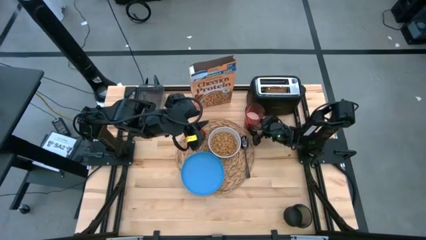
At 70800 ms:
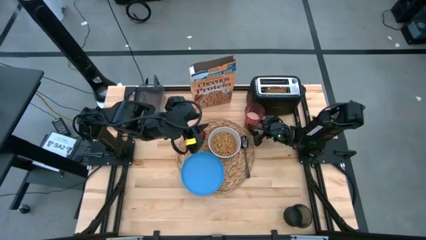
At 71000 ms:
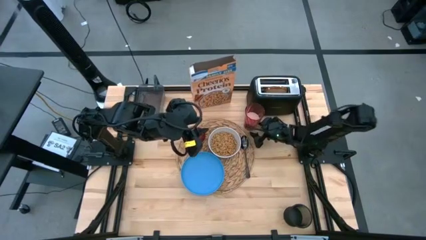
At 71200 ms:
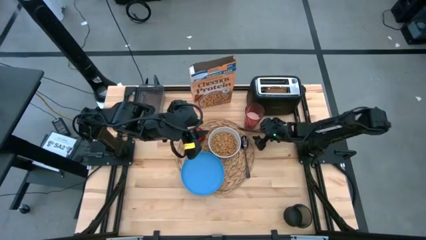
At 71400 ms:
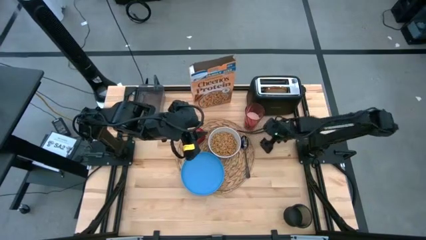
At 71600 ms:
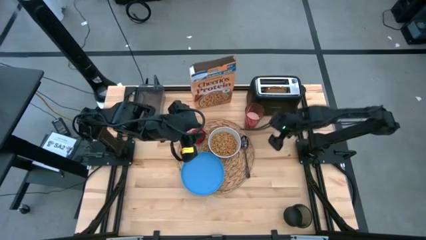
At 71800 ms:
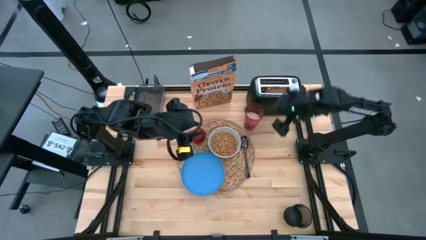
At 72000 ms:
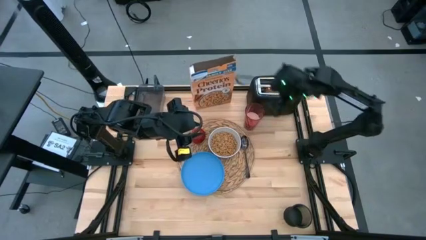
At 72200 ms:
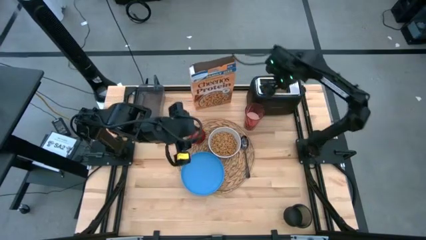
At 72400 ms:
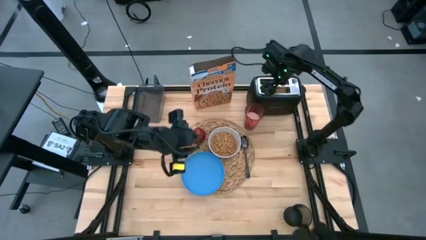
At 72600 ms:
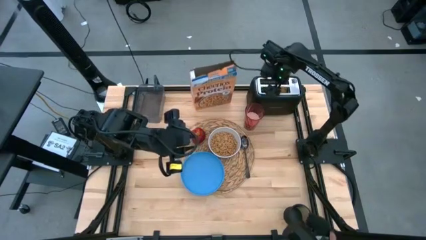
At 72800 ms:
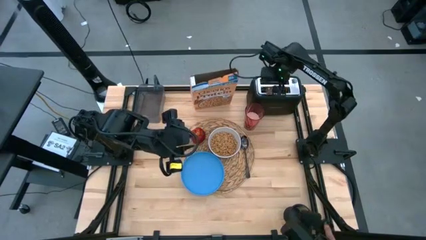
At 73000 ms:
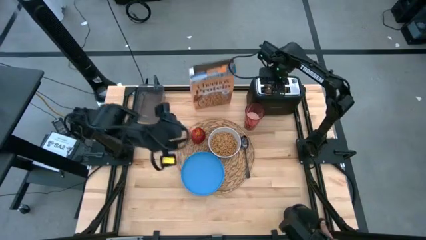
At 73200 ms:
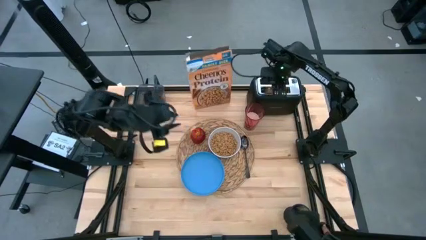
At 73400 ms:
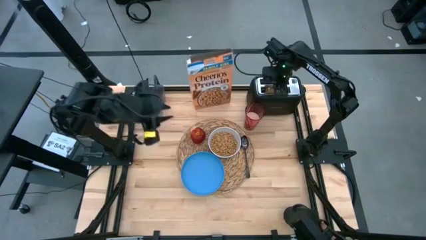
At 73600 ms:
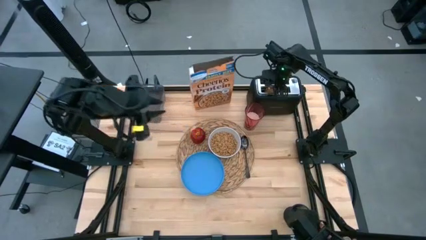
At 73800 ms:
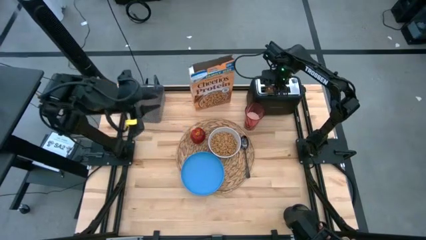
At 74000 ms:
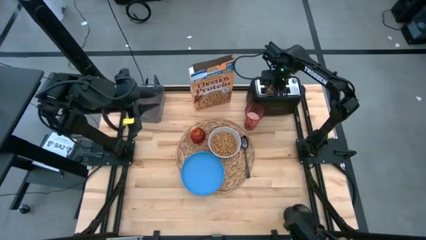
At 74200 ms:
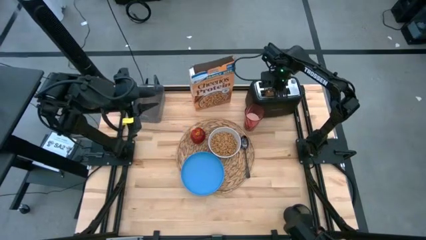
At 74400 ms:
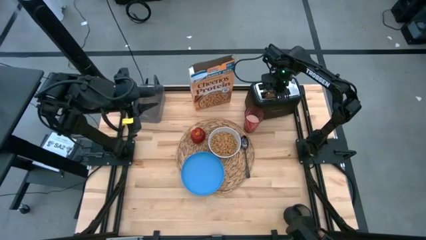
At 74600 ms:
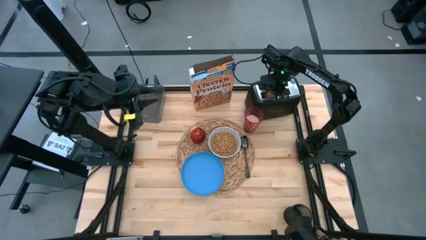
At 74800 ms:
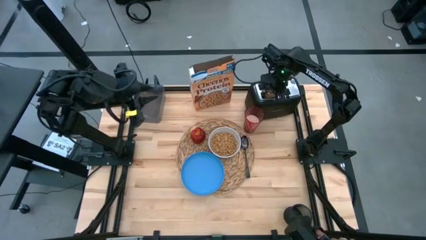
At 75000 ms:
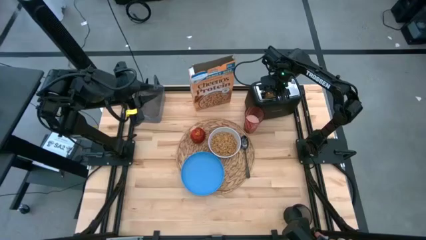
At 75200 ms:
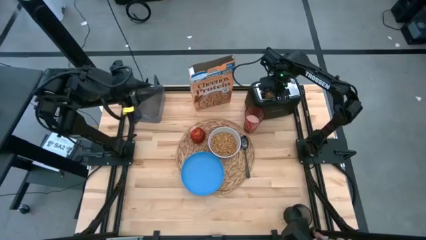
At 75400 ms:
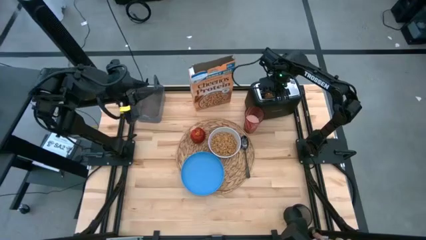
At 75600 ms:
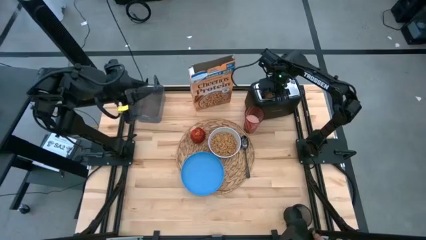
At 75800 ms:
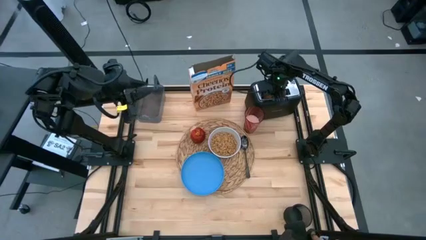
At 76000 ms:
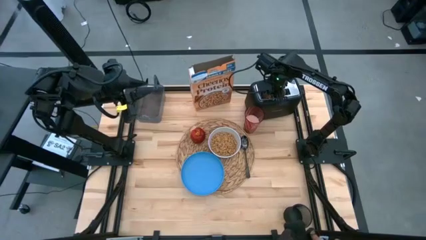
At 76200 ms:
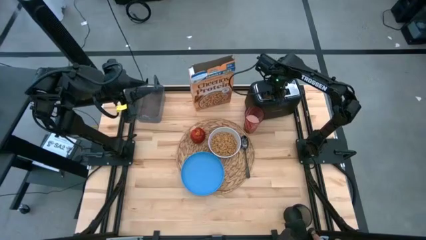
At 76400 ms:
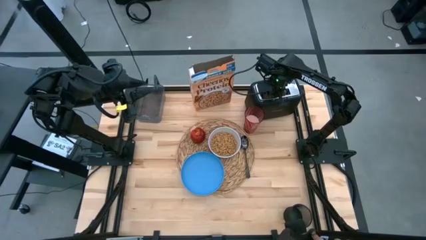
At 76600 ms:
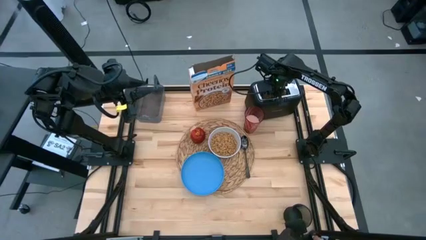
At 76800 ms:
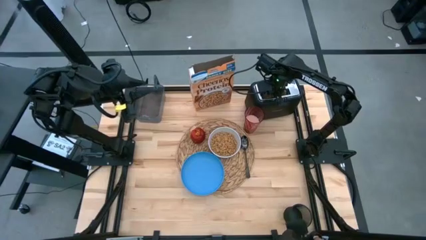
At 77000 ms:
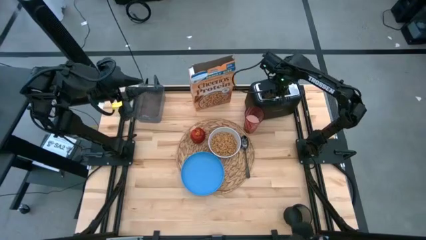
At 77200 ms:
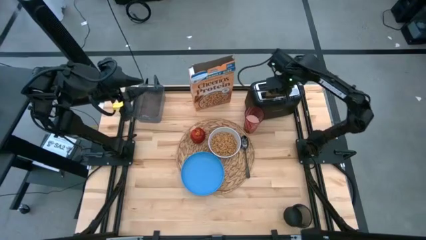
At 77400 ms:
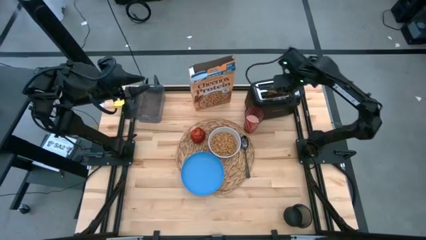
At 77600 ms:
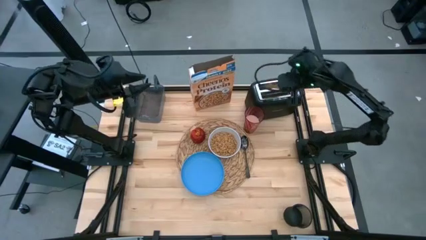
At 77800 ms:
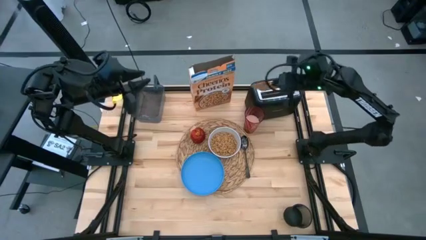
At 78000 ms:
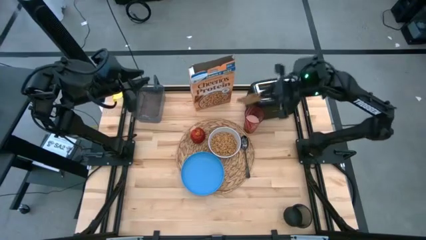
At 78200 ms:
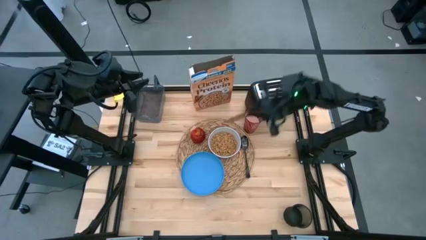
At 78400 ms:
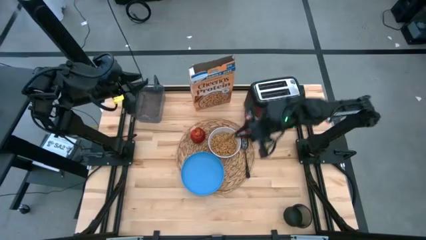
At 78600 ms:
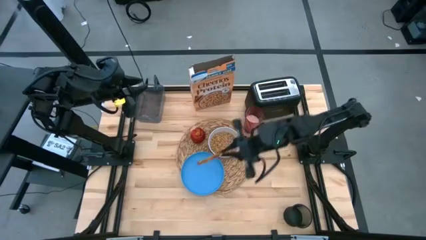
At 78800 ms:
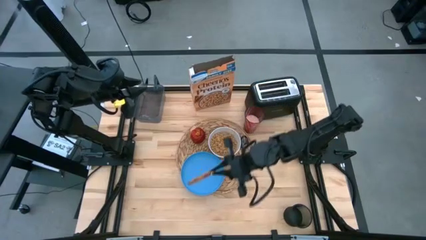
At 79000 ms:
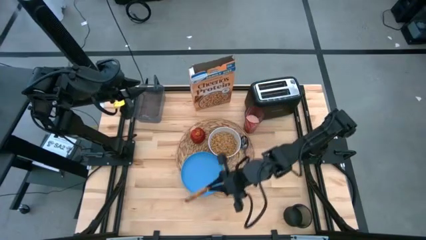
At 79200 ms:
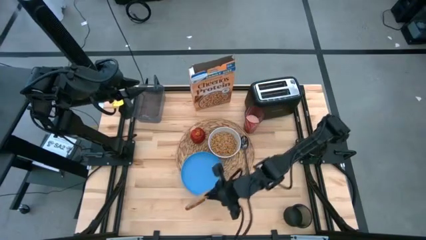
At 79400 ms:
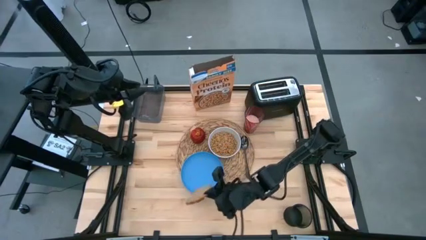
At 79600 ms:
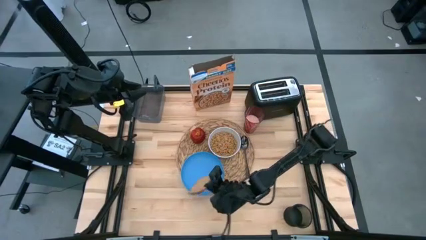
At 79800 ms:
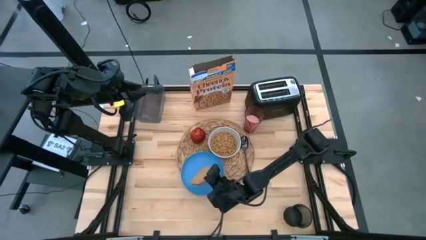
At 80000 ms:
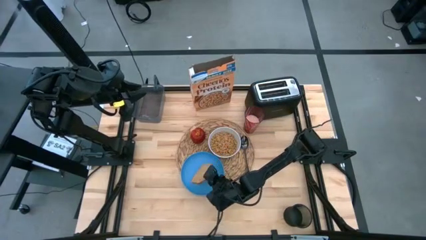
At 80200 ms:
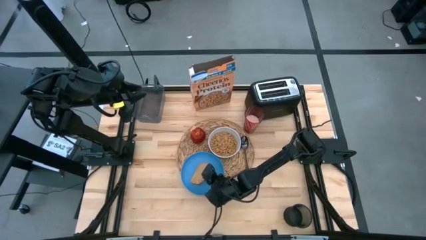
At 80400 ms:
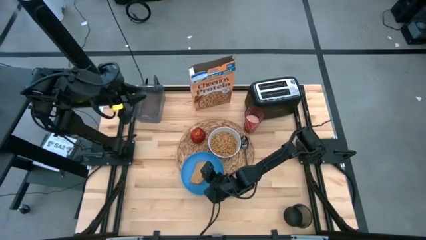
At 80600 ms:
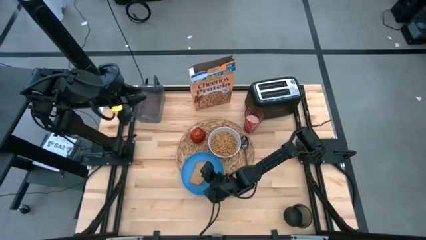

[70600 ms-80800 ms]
Task: Arrange a breakfast setting
Put the bagel on top of the blue plate

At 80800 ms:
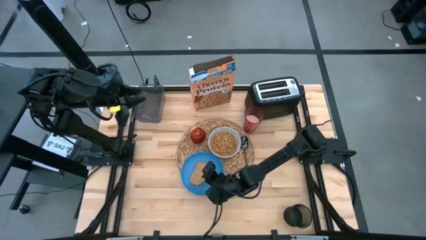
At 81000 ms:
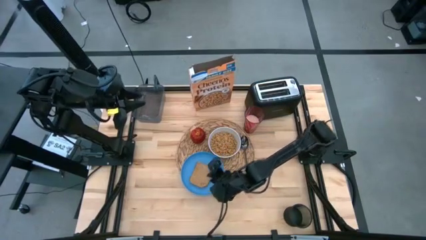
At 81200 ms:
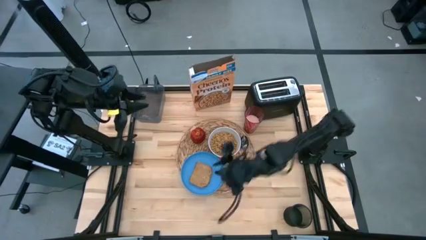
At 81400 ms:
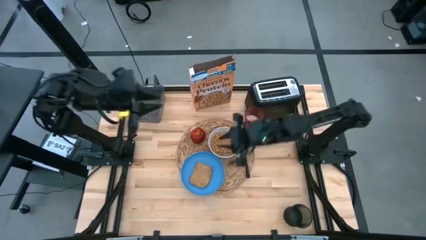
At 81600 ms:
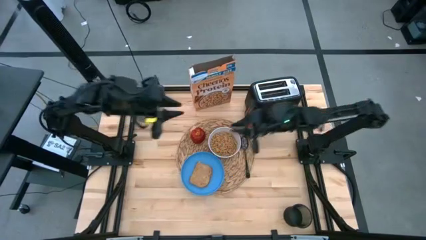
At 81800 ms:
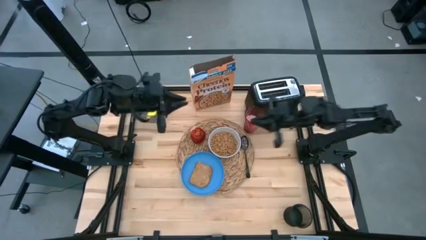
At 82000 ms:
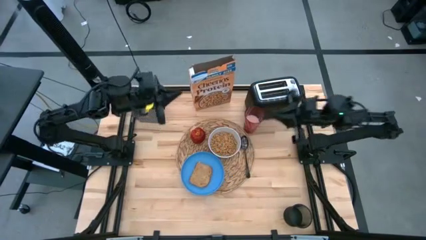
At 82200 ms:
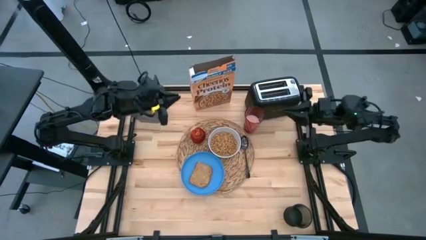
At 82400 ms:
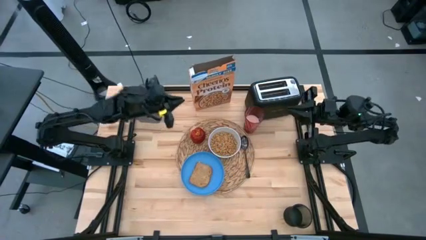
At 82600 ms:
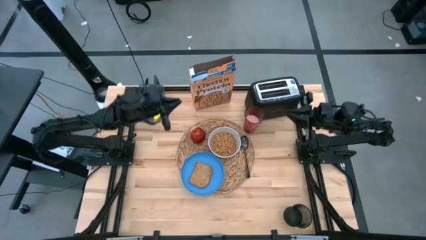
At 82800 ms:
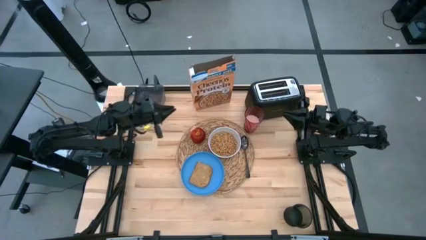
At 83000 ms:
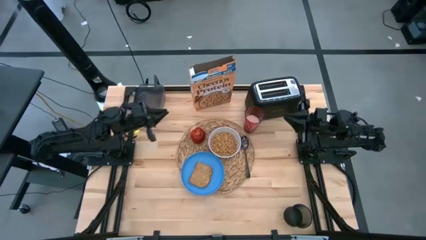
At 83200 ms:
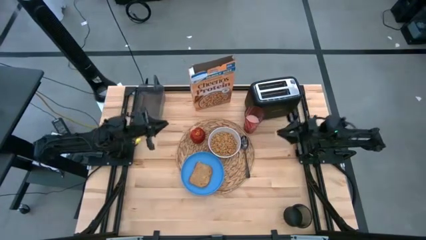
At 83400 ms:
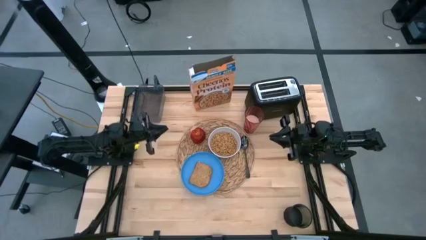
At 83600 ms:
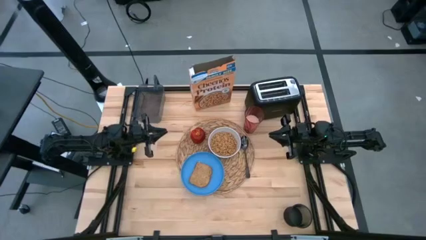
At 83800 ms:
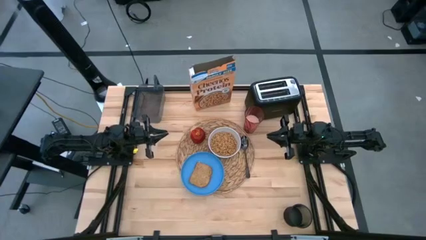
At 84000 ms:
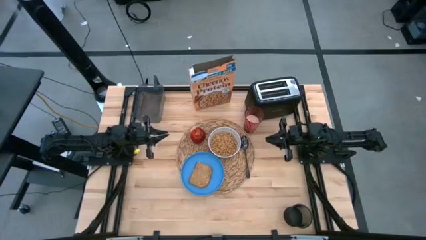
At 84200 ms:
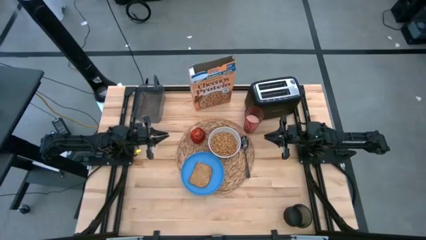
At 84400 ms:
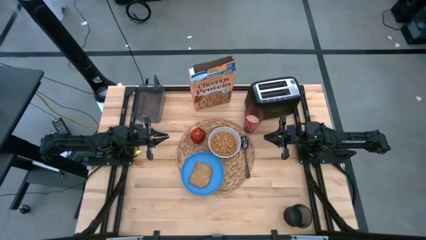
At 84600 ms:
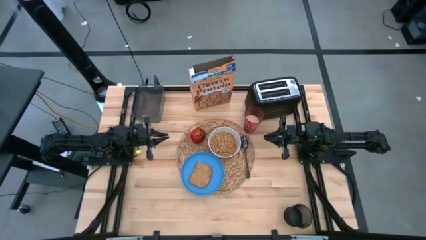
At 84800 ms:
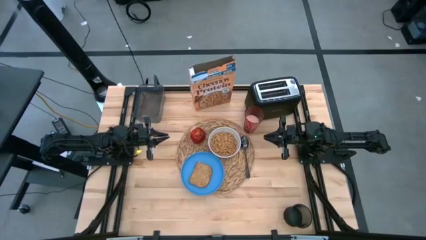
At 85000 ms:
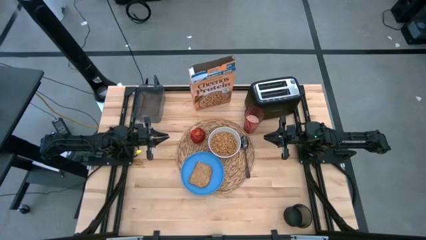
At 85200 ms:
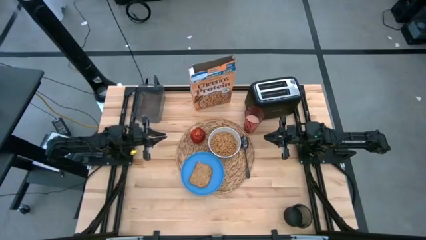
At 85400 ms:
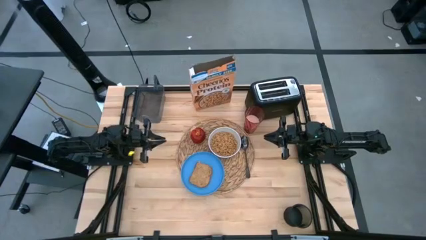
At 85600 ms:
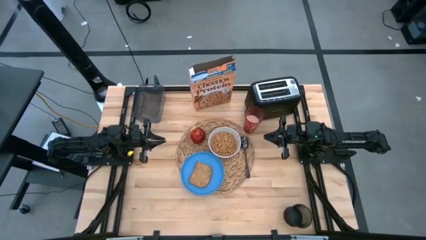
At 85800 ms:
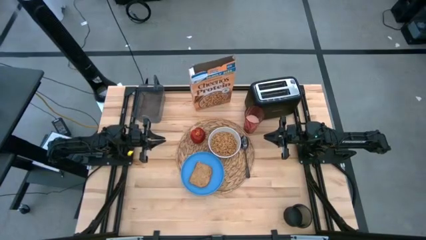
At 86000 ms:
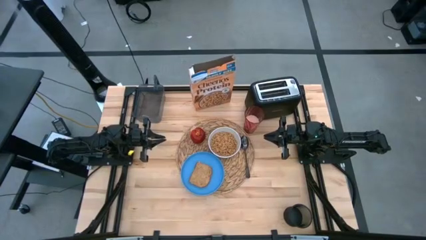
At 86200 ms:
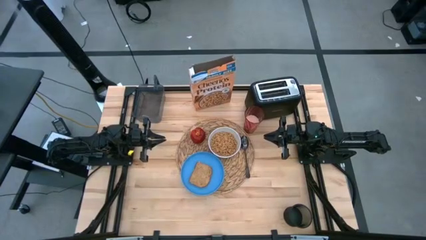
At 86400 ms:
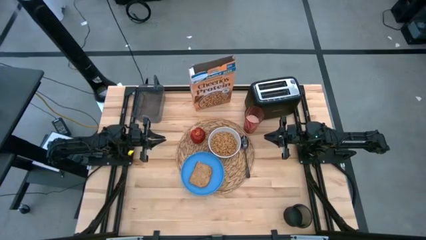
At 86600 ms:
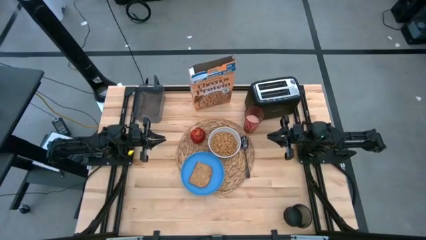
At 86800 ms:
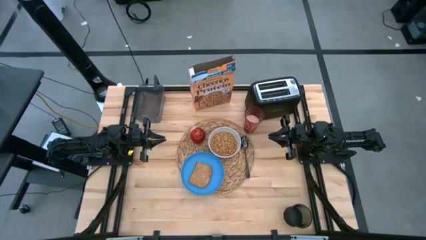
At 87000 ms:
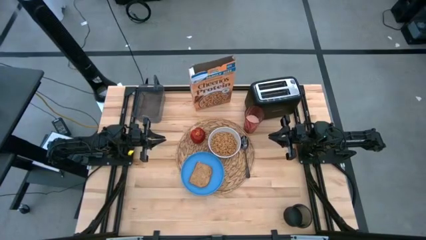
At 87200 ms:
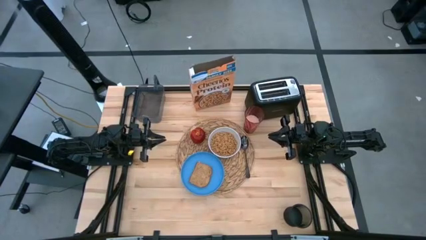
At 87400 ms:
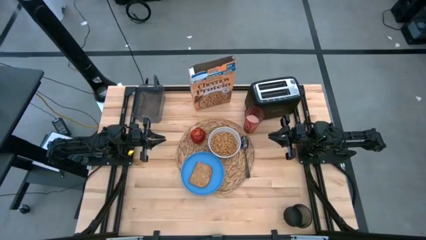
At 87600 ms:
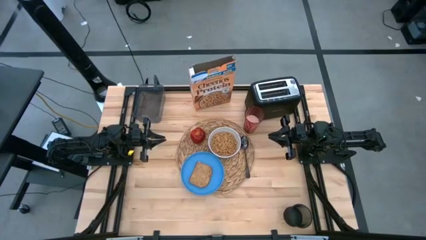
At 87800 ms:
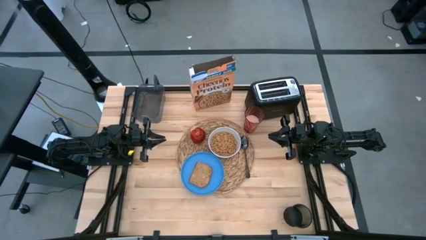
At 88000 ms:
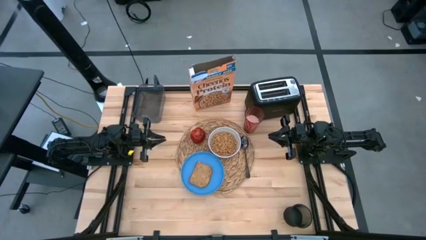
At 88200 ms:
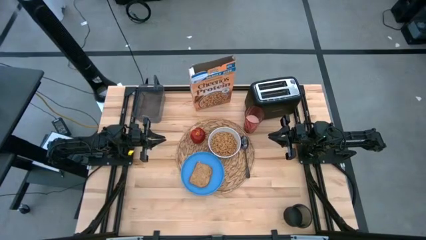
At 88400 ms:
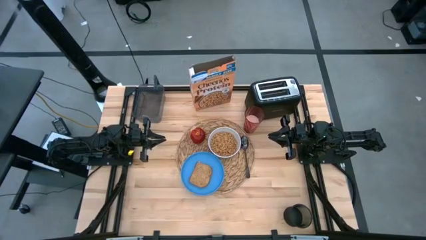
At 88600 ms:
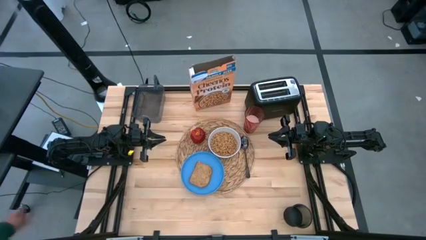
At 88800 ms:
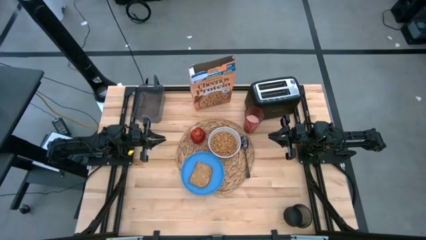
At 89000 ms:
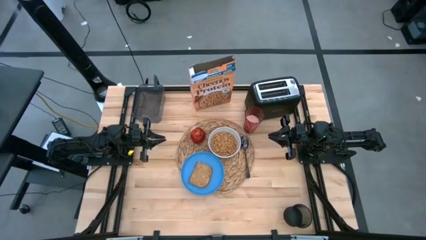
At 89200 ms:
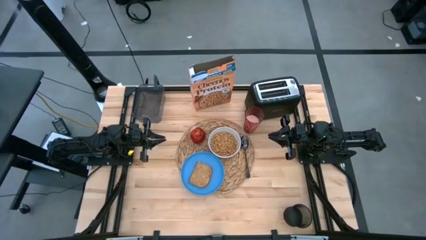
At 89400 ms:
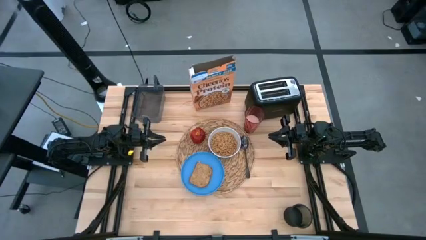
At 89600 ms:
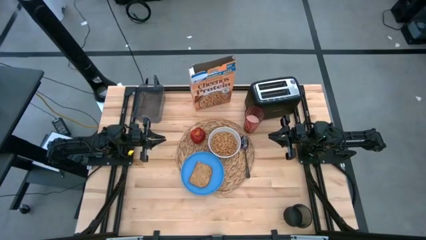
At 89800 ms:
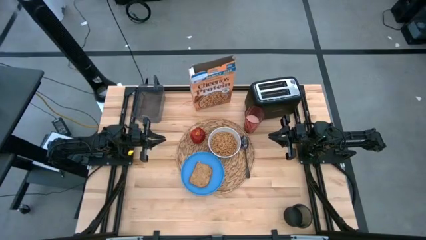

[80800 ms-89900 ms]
Return to Home Position
